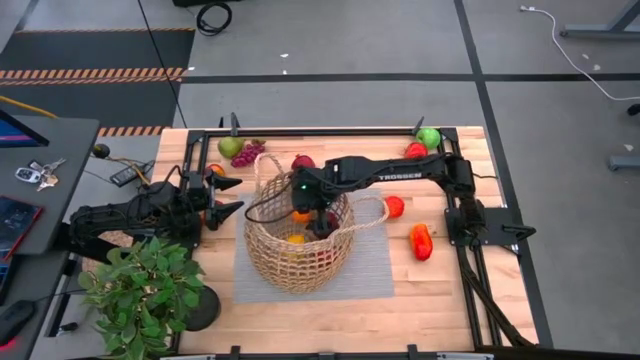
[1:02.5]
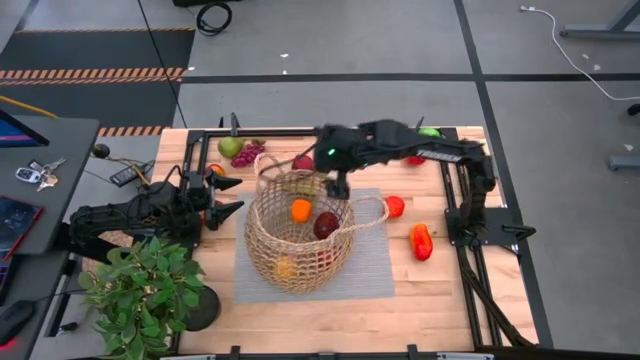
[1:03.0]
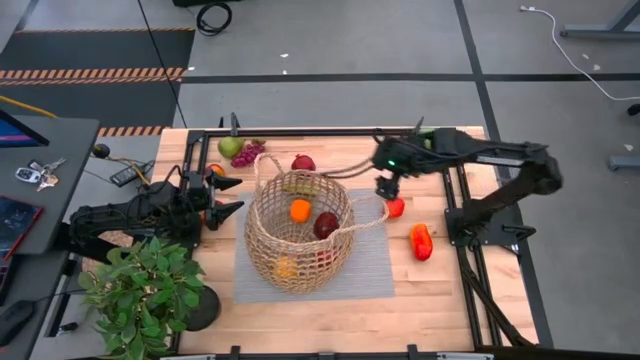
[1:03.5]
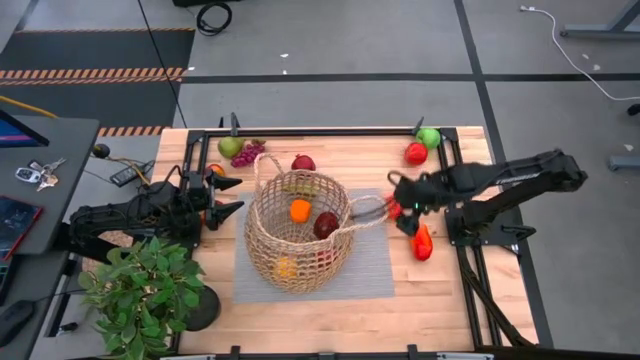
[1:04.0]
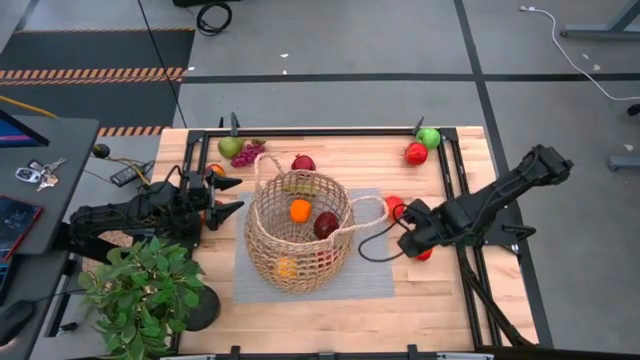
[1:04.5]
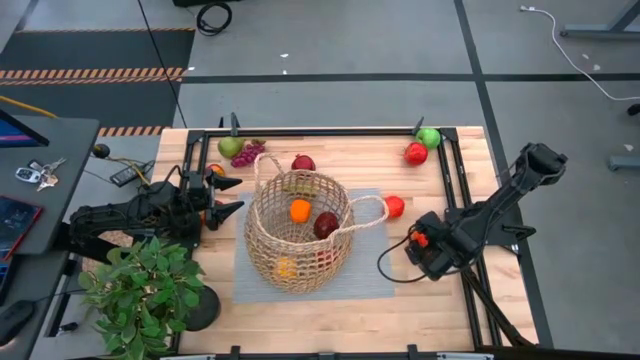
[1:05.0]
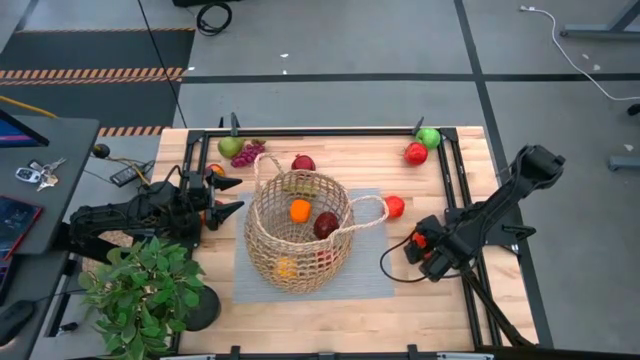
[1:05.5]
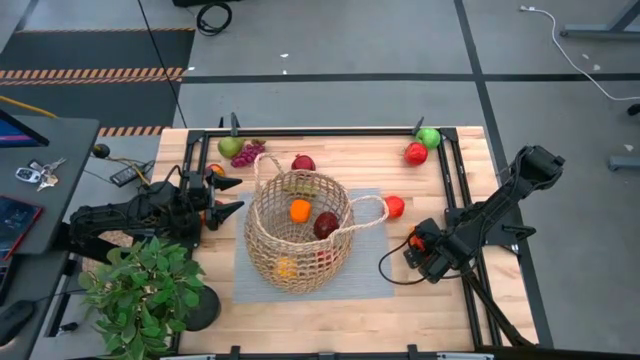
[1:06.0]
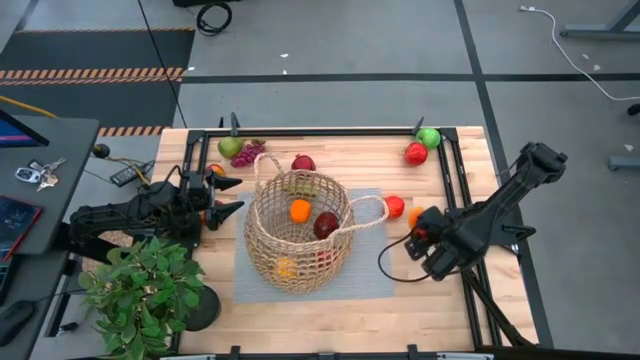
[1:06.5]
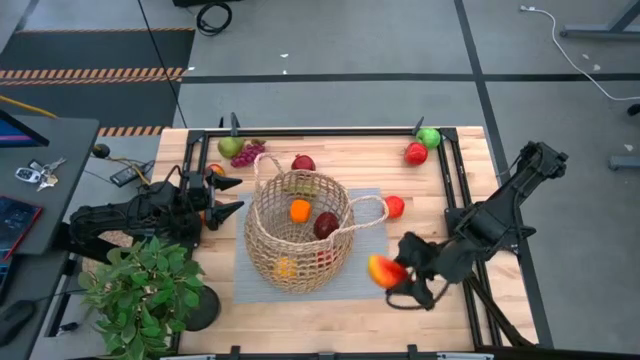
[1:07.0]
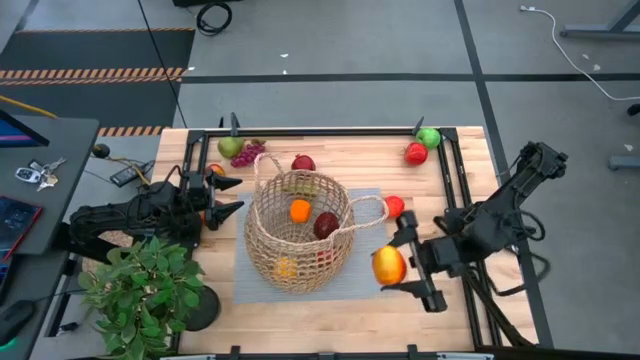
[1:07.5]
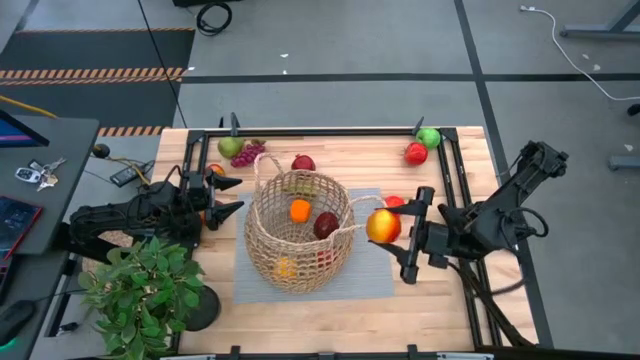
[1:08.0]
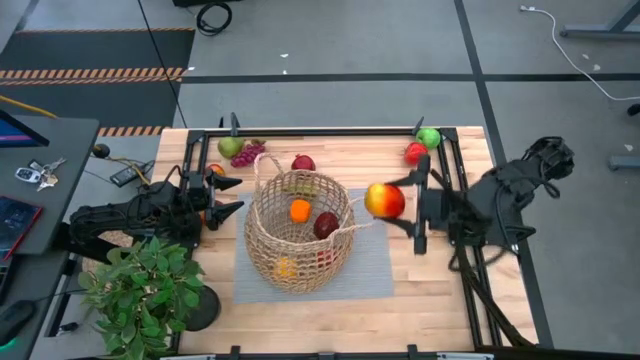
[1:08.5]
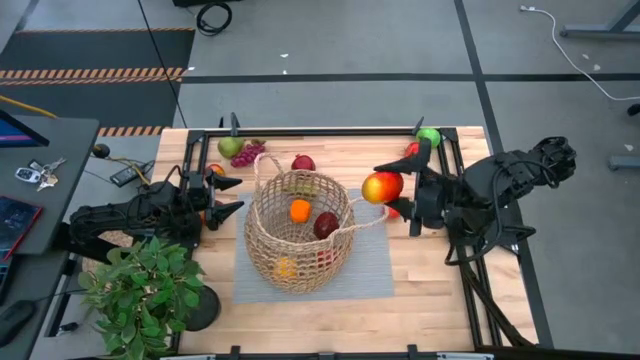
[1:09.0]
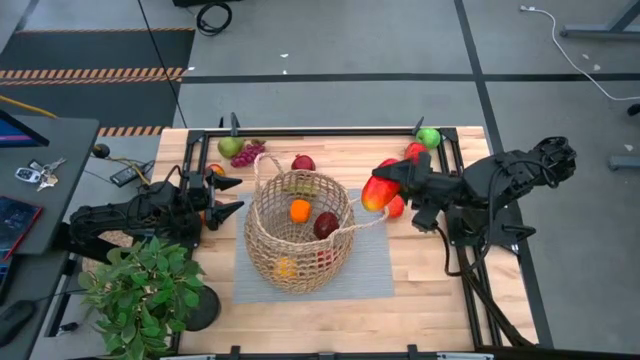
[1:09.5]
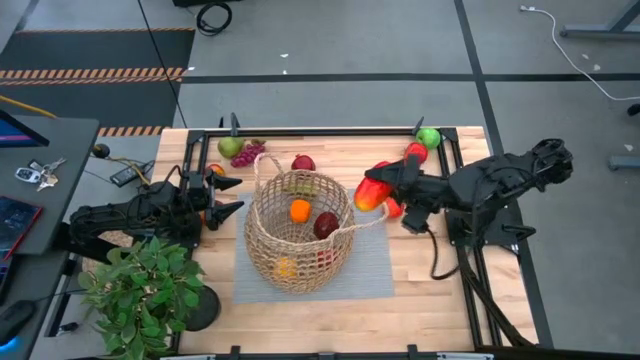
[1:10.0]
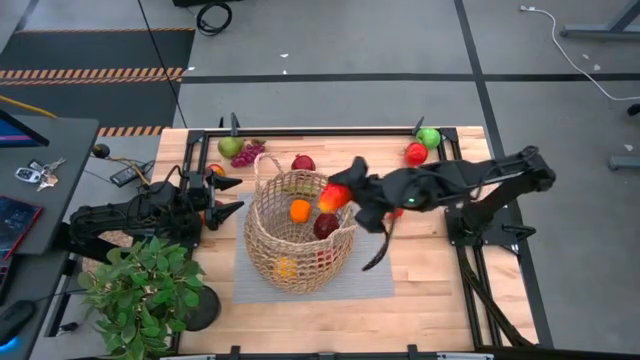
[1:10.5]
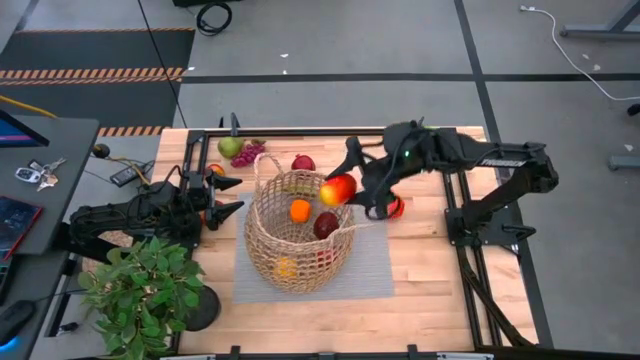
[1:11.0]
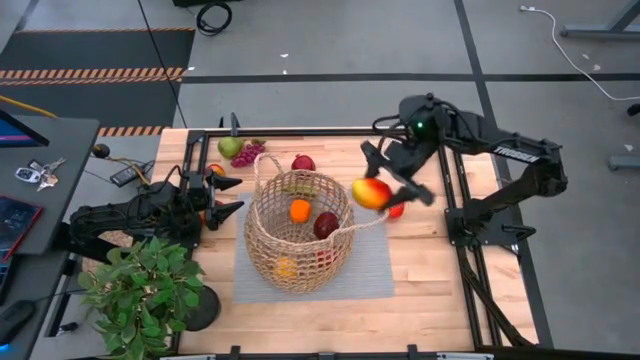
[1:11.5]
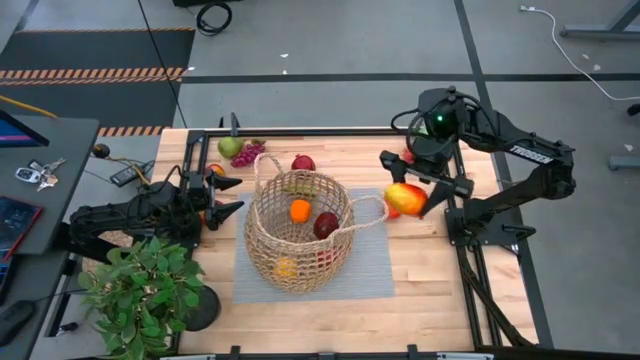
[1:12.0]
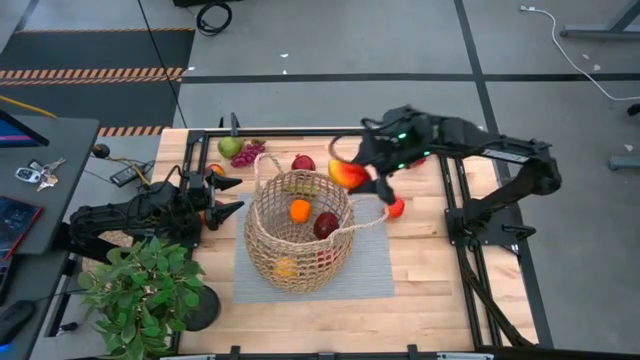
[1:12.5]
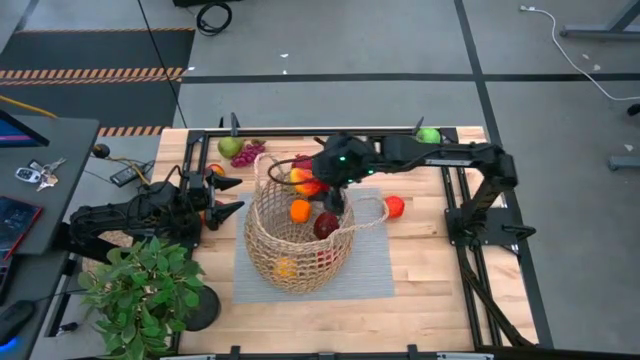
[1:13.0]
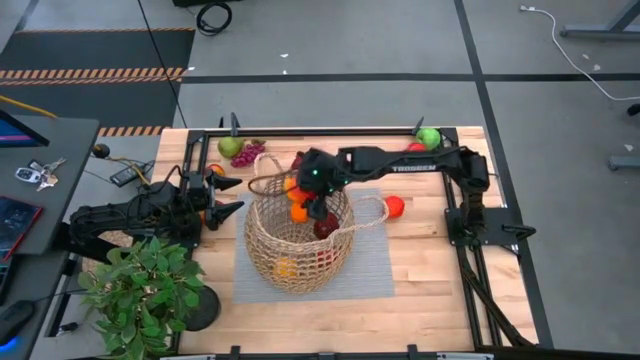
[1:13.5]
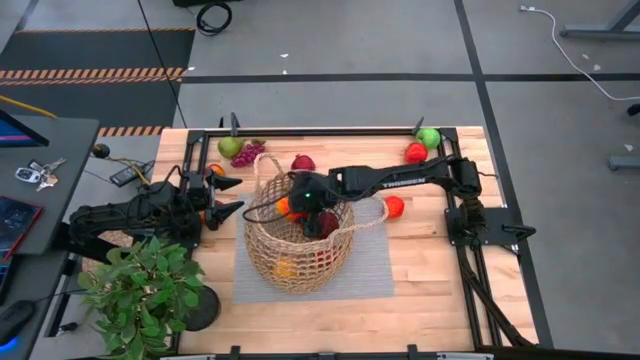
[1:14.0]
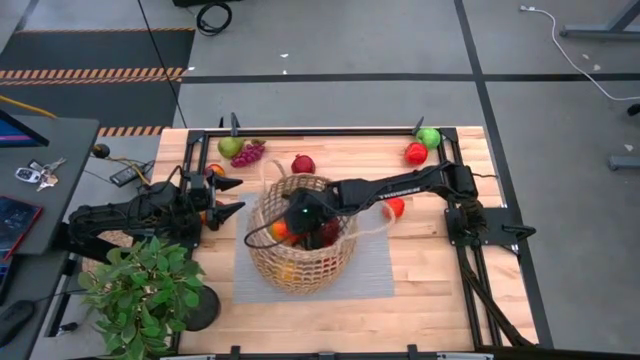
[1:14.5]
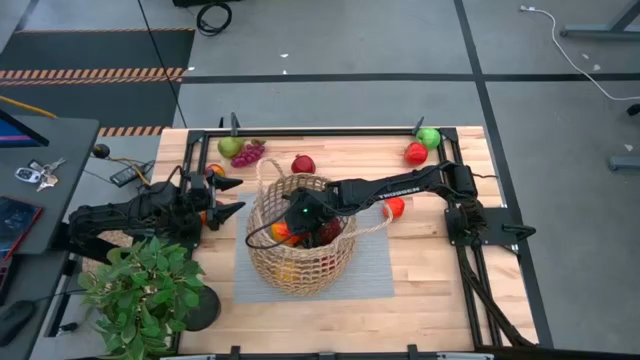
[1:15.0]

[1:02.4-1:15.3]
Task: Build produce basket
Put the red mango into the brown woven basket

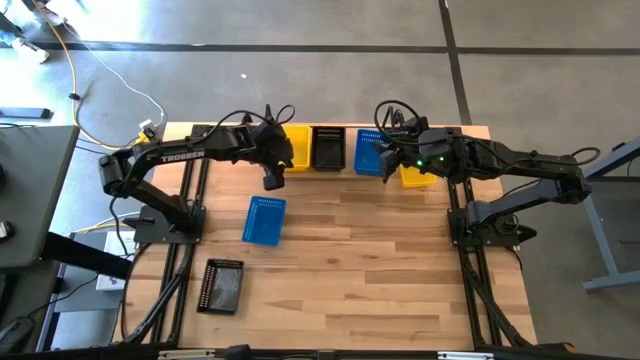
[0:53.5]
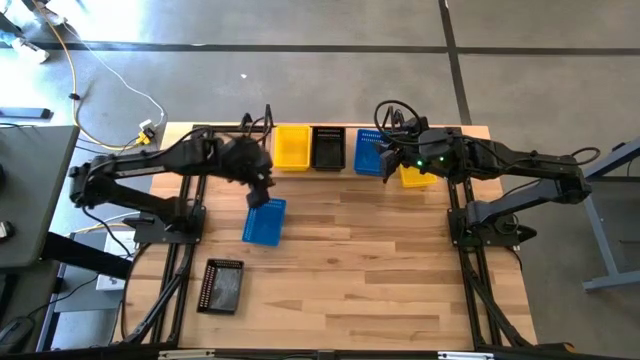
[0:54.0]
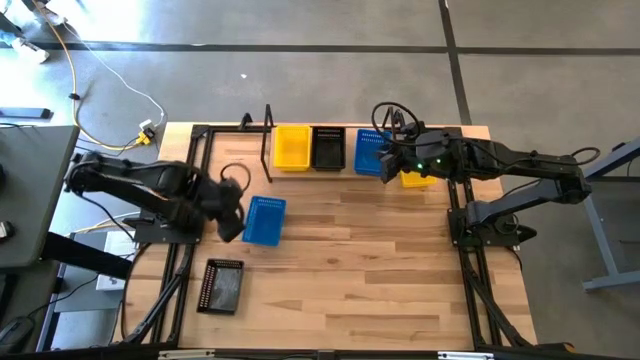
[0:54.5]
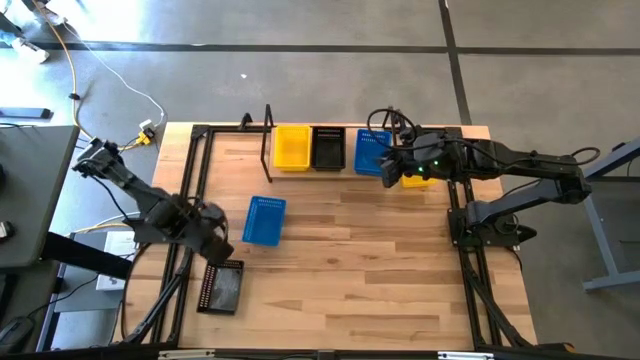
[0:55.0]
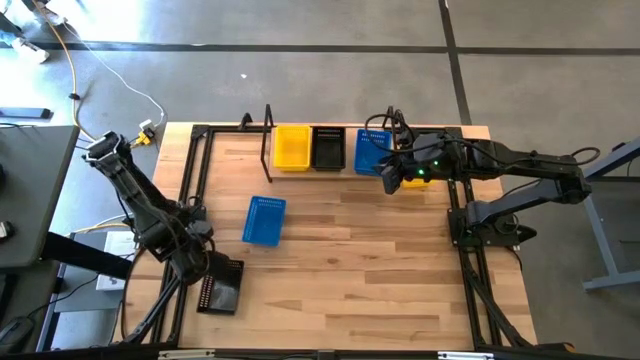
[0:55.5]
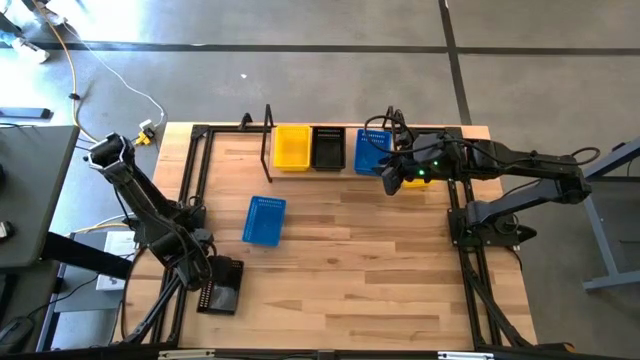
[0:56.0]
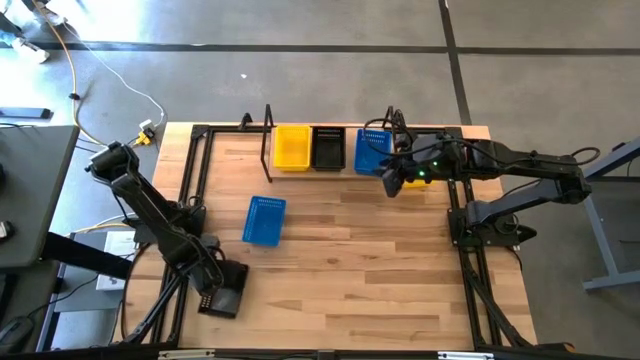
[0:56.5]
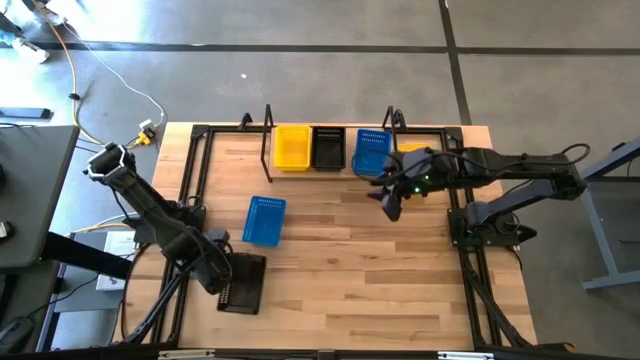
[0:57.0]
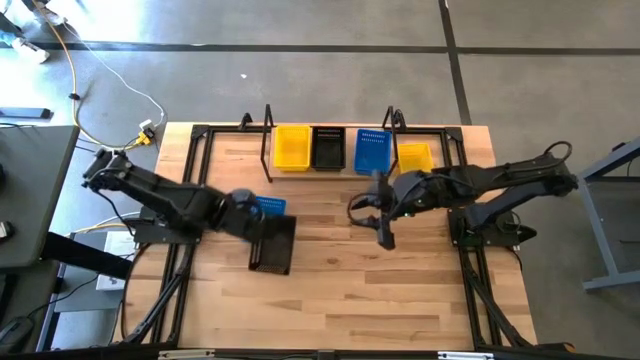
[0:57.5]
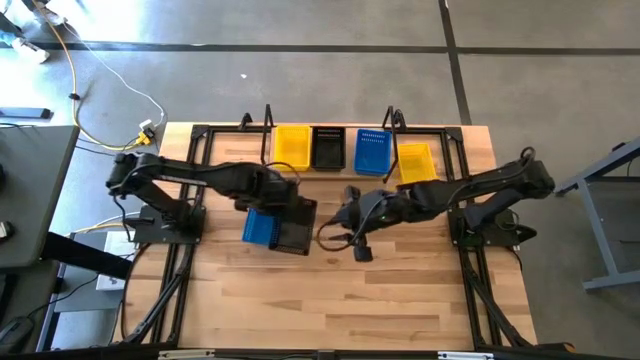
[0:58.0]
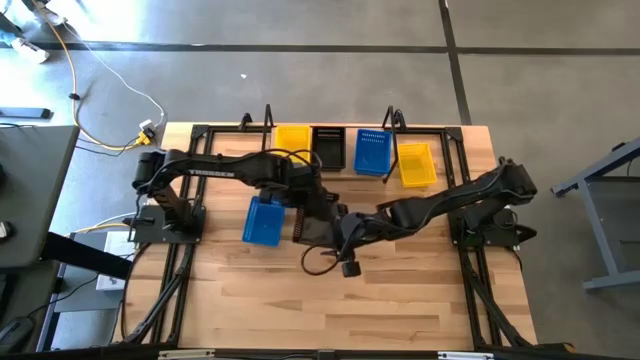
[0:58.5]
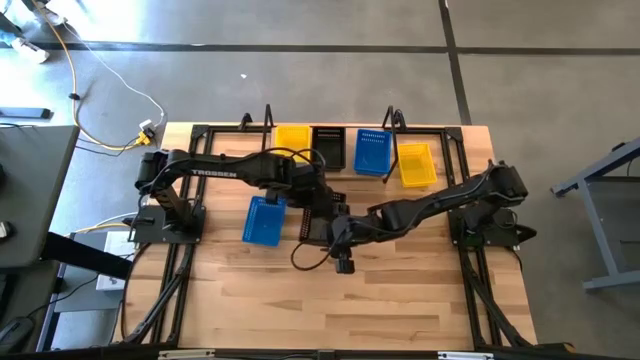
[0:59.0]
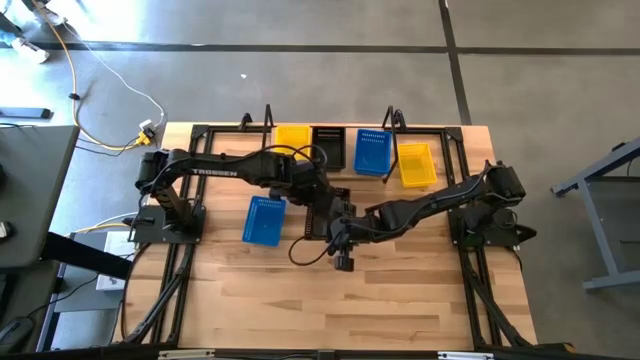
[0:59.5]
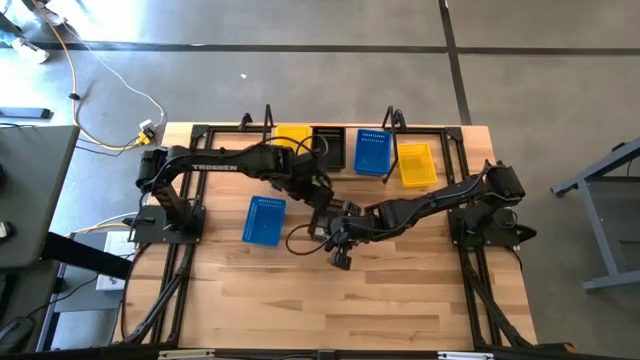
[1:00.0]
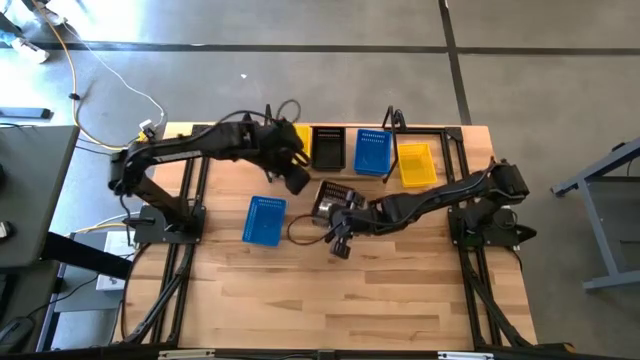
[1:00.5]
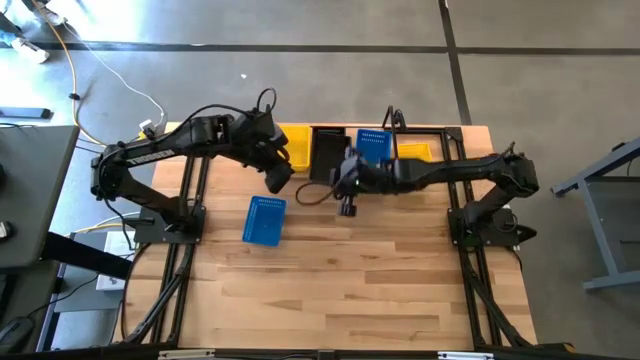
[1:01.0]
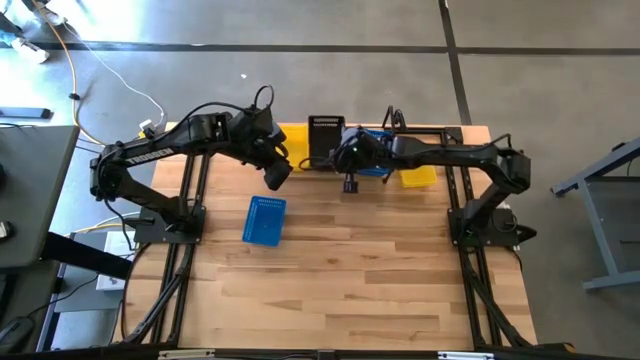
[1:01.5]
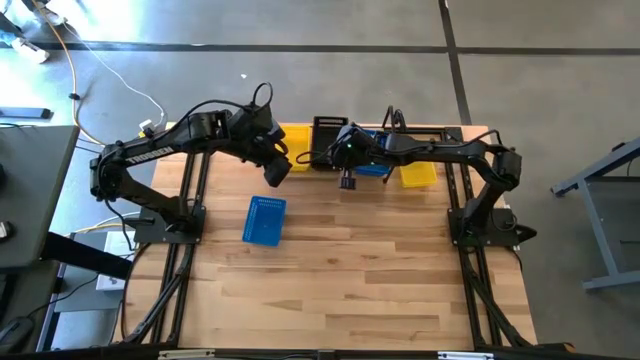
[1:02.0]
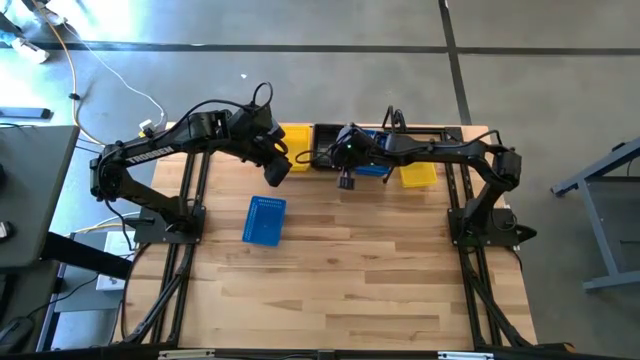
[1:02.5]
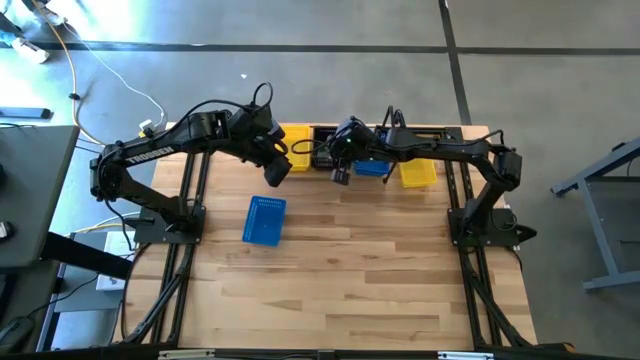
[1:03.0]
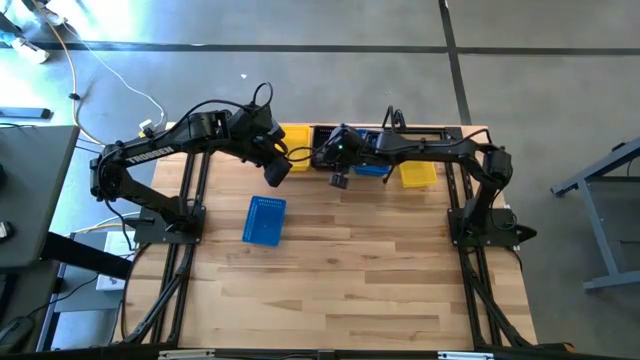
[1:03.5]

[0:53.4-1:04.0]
Task: Stack baskets on shelf by color
Stack the black bin on top of the other black stacked bins on the shelf
